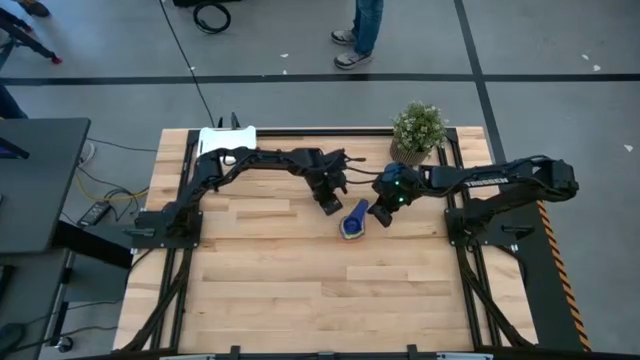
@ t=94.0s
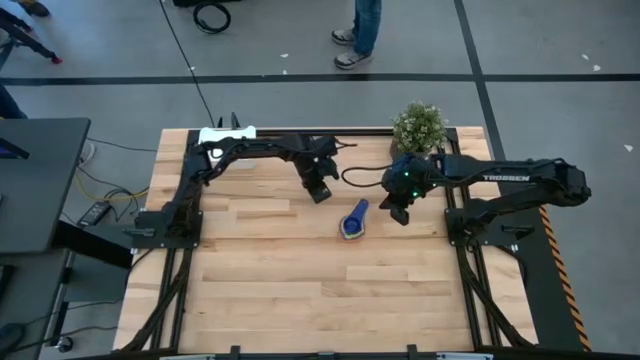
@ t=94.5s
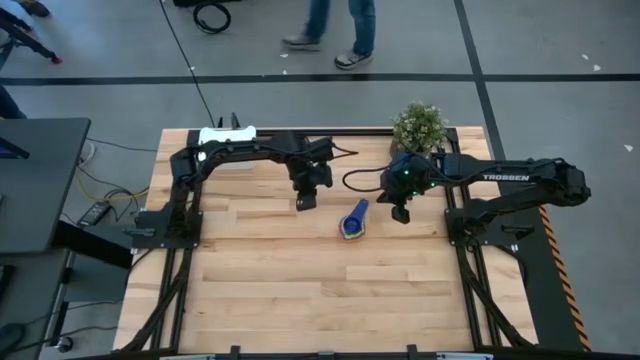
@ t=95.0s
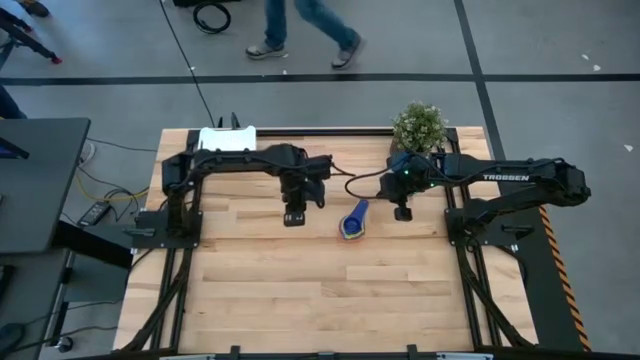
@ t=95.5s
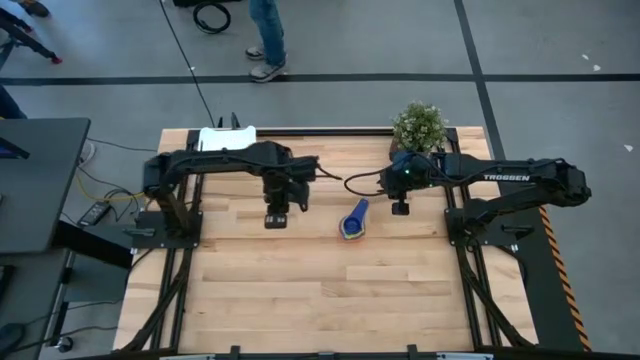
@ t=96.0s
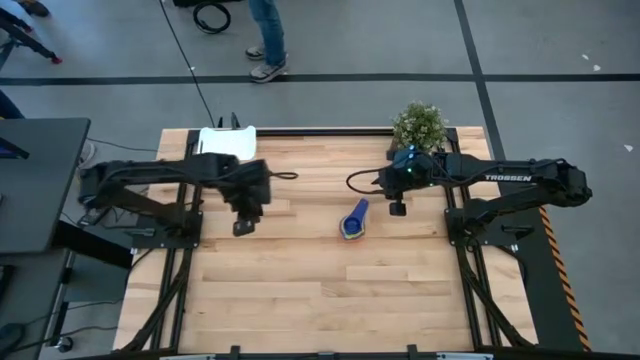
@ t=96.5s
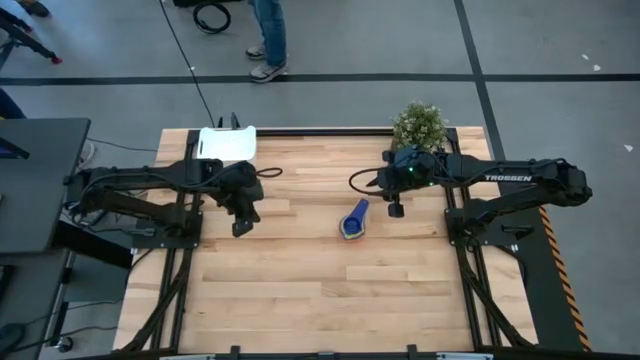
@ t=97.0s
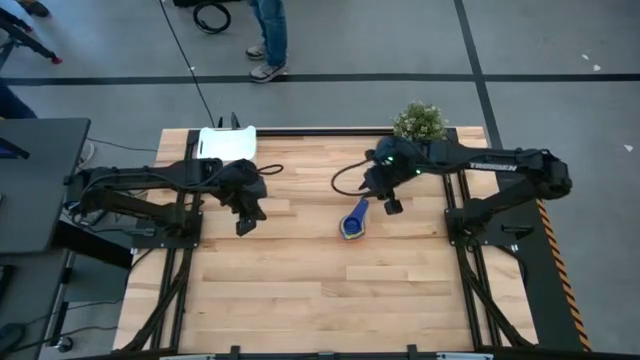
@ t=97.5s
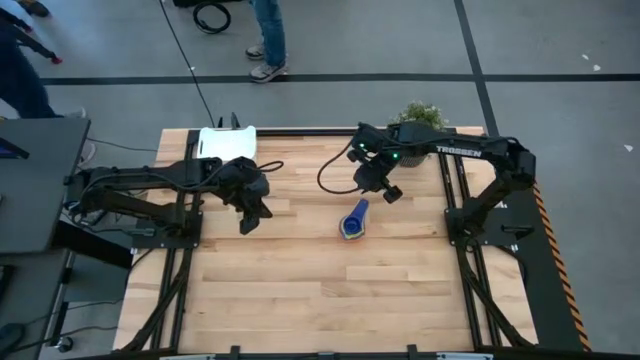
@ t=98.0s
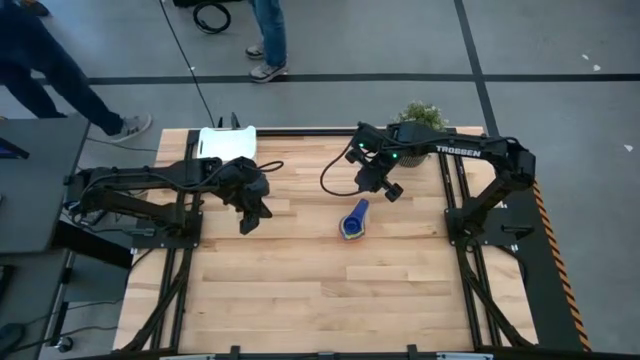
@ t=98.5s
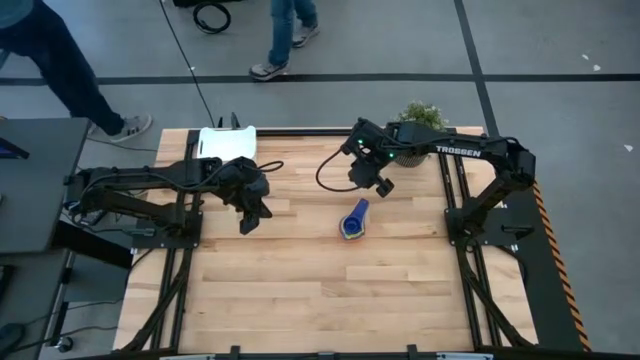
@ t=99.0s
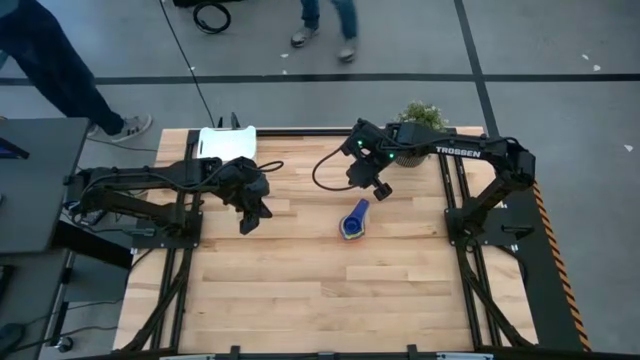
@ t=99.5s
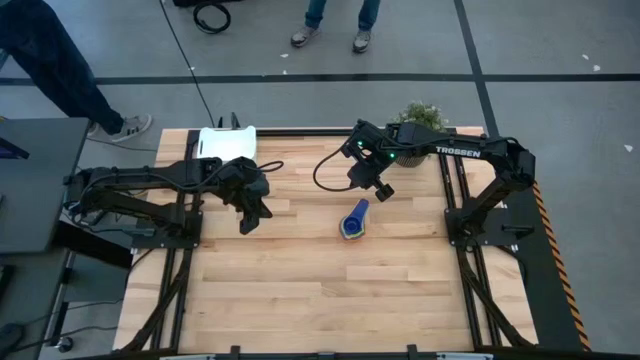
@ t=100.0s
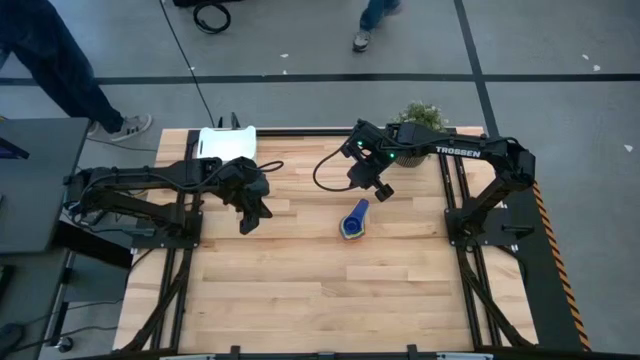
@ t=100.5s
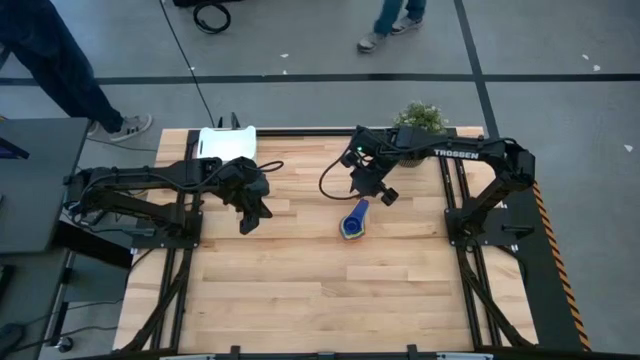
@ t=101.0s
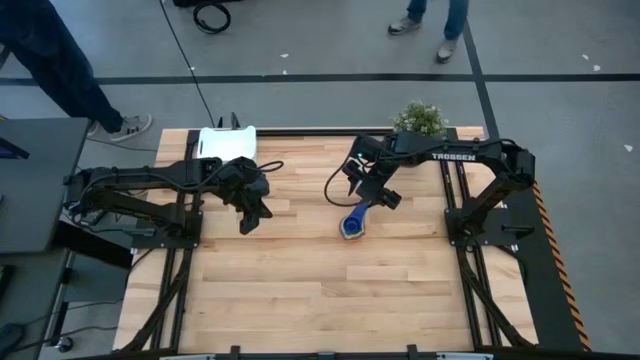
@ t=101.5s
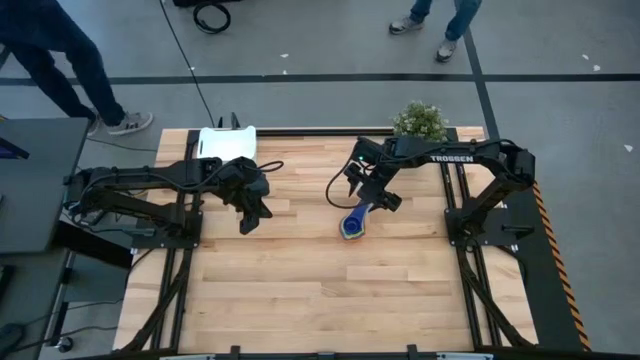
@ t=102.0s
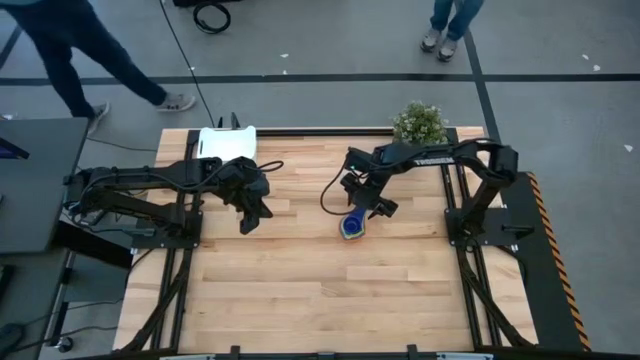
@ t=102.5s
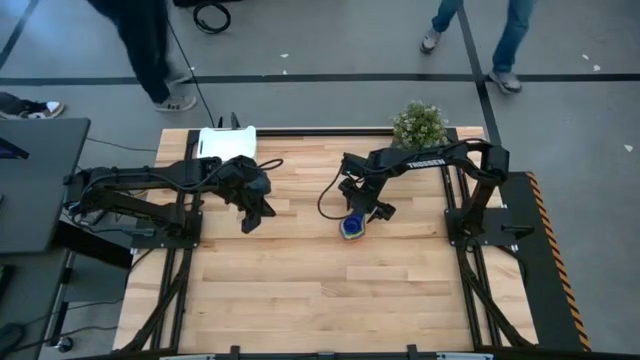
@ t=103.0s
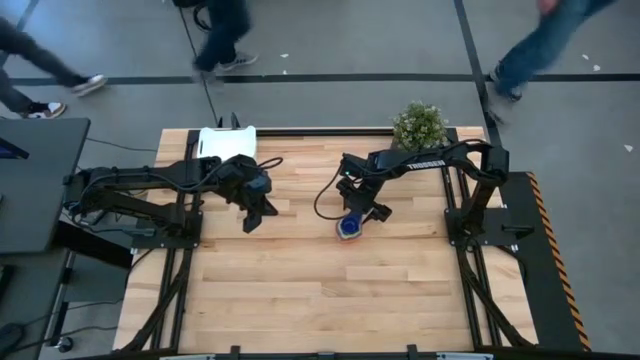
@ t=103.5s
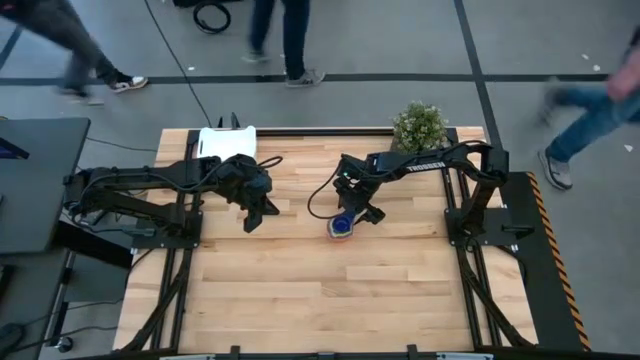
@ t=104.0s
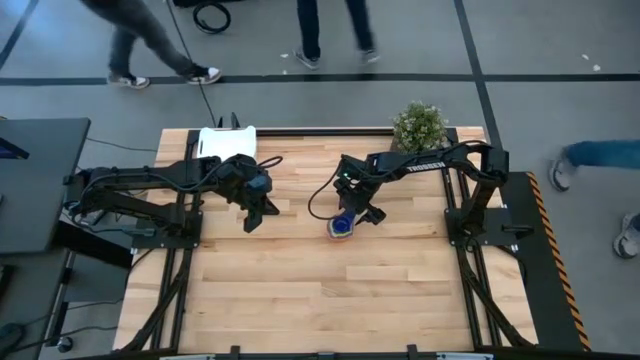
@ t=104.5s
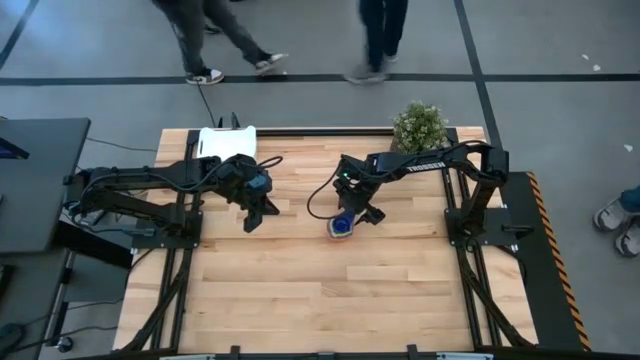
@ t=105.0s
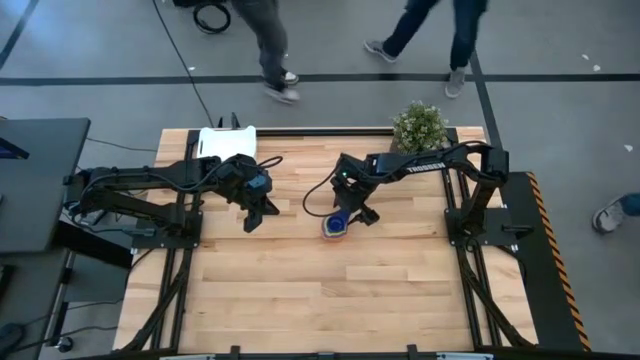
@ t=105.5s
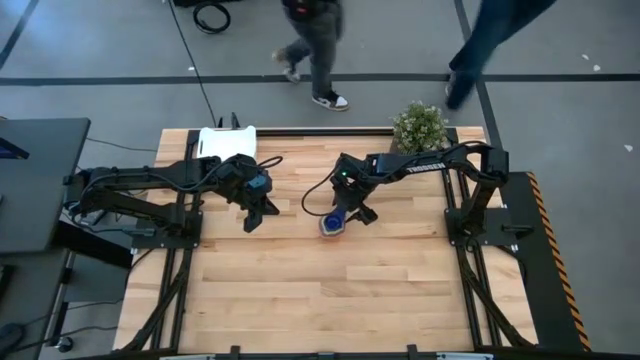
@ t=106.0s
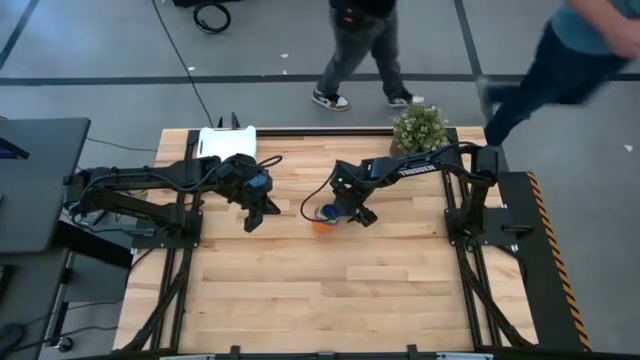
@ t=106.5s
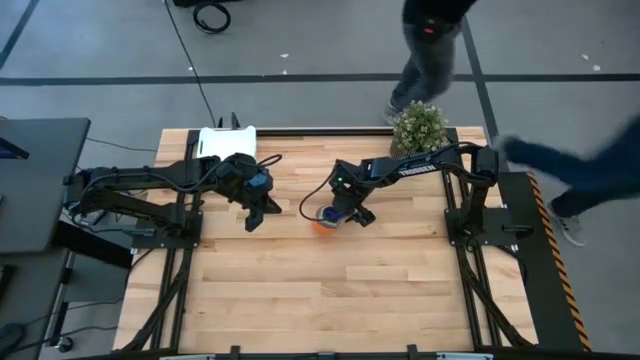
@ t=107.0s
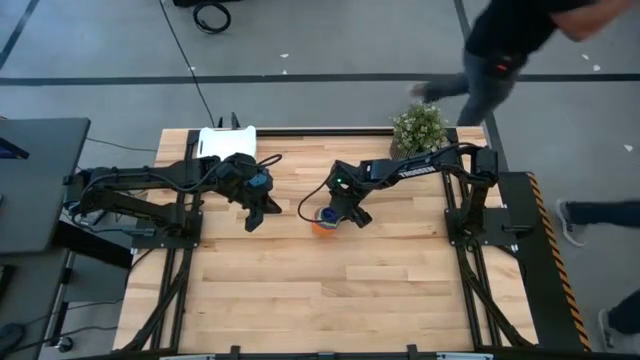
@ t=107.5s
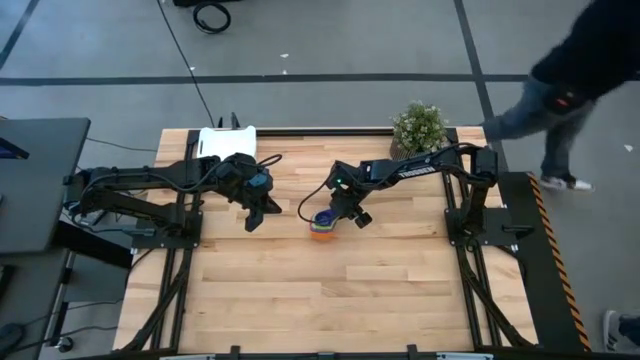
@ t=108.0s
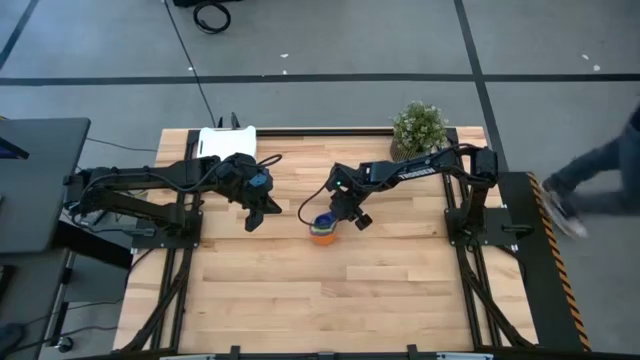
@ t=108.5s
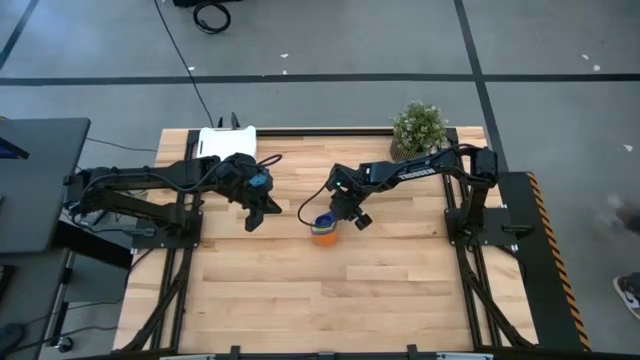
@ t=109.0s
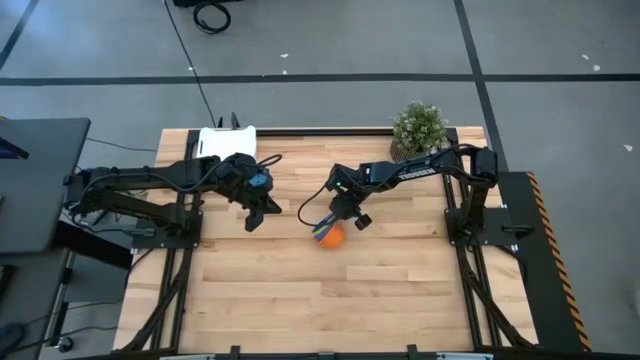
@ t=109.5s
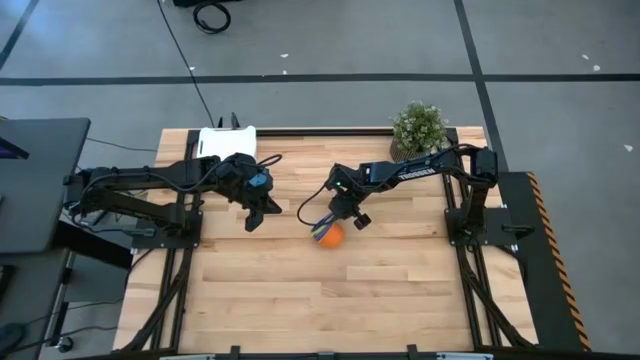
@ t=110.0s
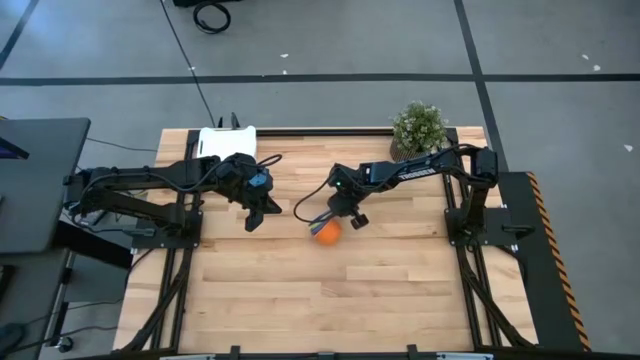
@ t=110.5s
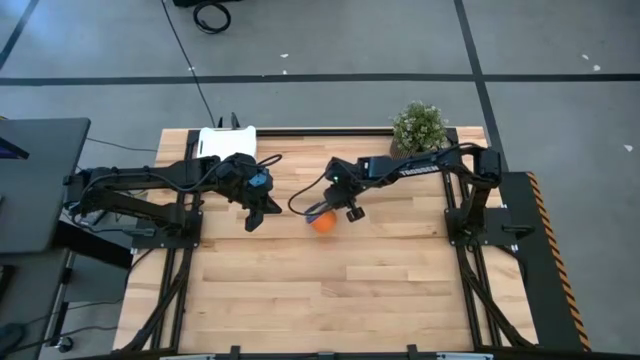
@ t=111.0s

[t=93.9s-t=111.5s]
Task: Nest measuring cups in basket
Put the nested measuring cups into the white bin

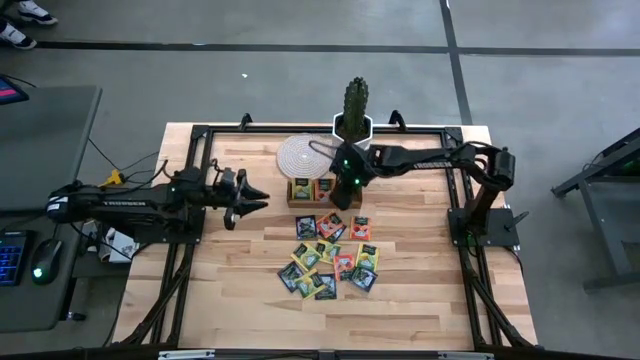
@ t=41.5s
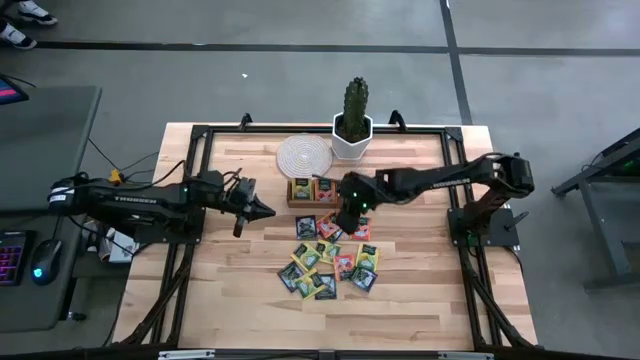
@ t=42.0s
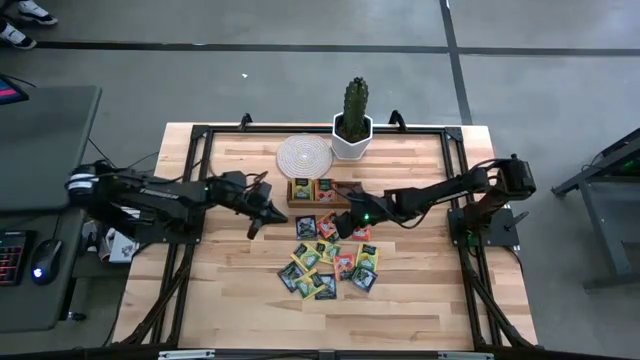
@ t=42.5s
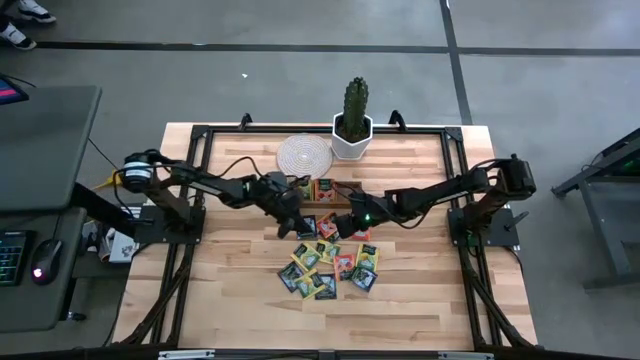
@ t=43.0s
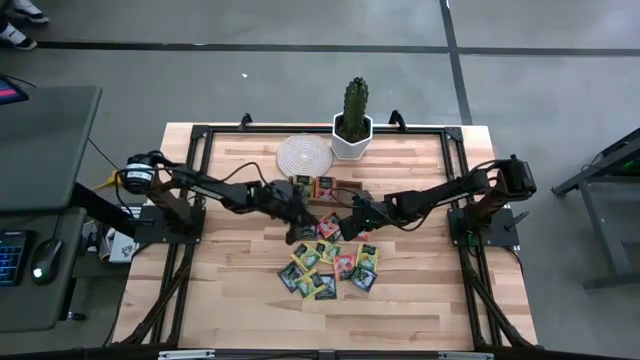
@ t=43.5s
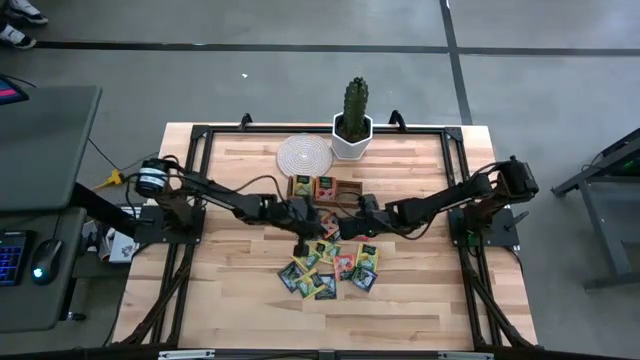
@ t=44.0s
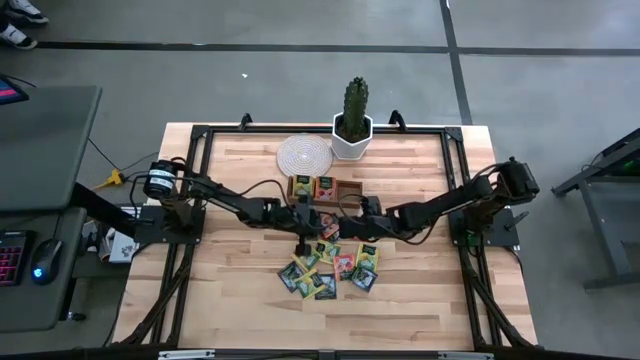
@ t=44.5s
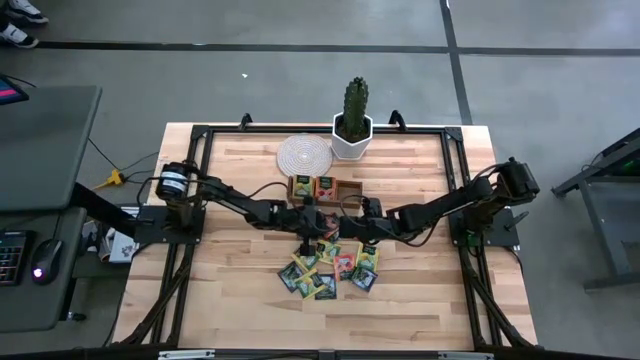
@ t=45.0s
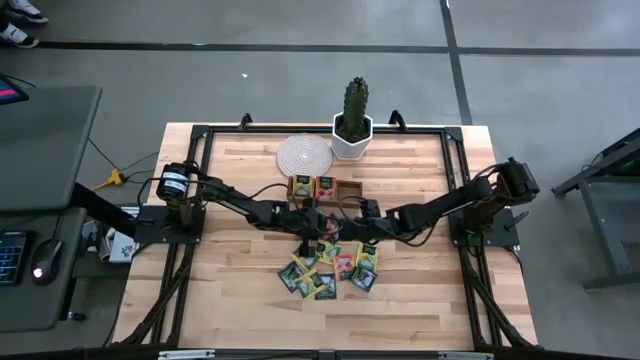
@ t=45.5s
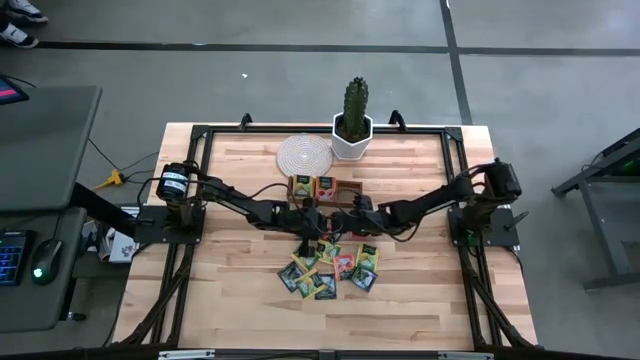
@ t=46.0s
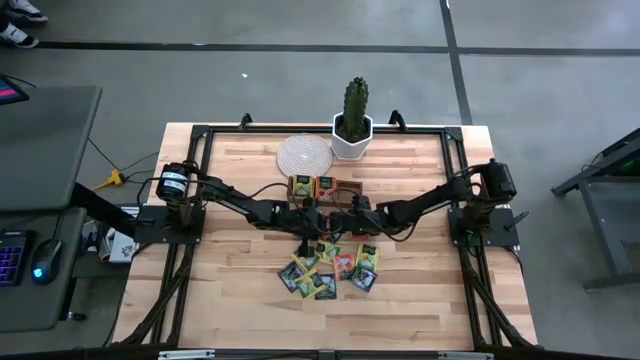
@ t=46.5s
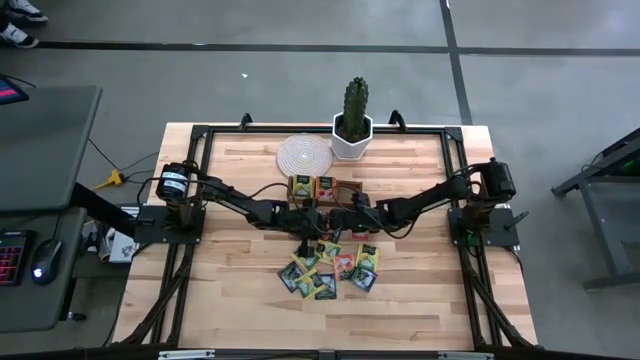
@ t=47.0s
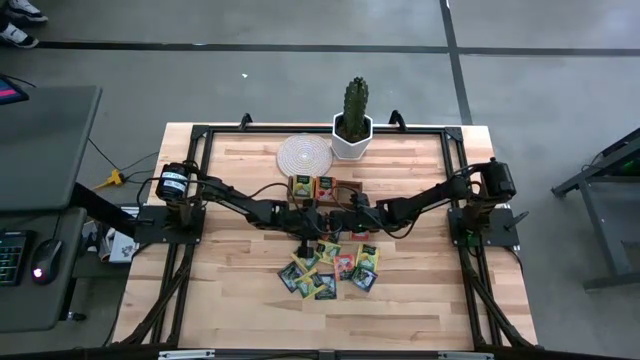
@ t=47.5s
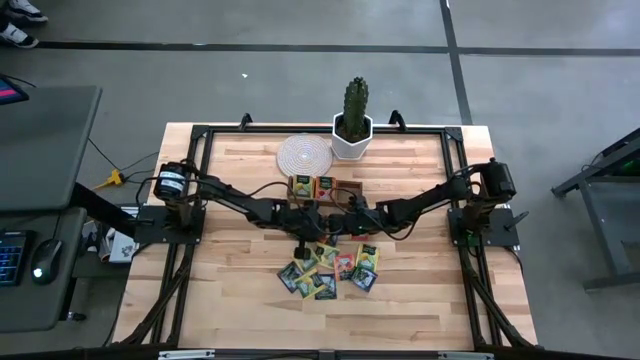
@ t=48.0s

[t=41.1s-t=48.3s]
Task: Pick & Place Tea
Put the orange tea bag into the middle section of the wooden organizer
